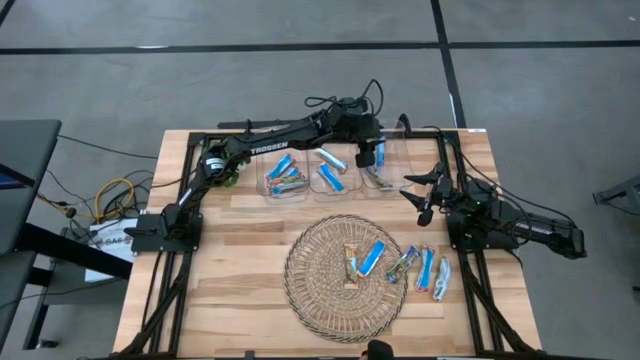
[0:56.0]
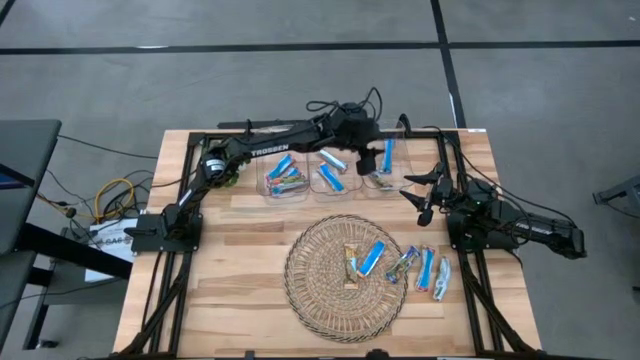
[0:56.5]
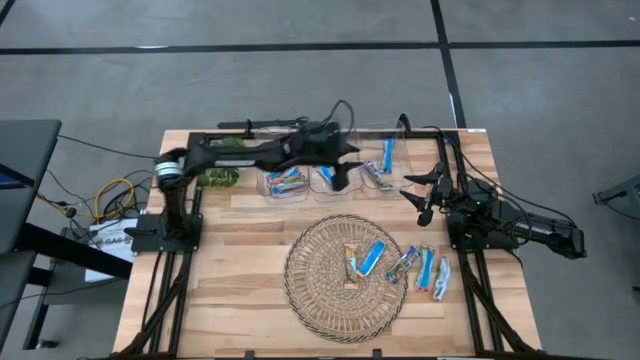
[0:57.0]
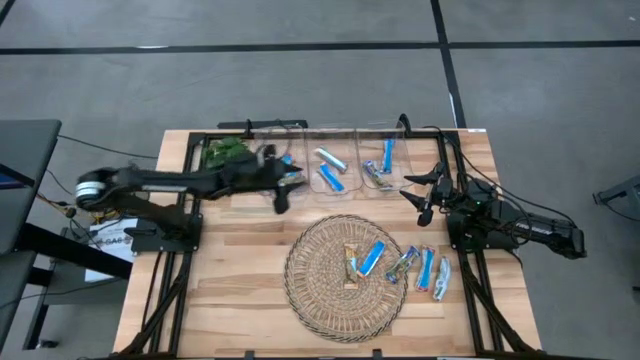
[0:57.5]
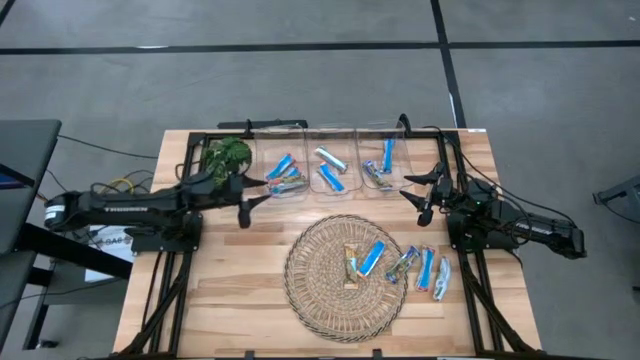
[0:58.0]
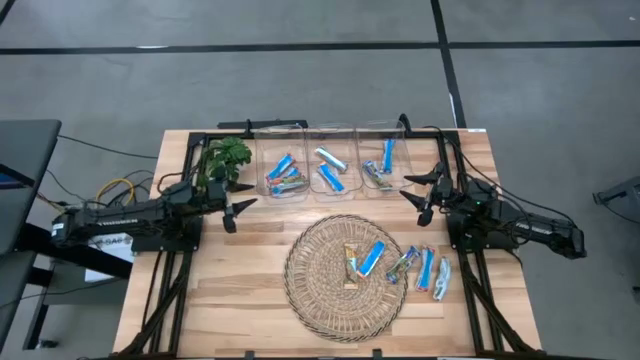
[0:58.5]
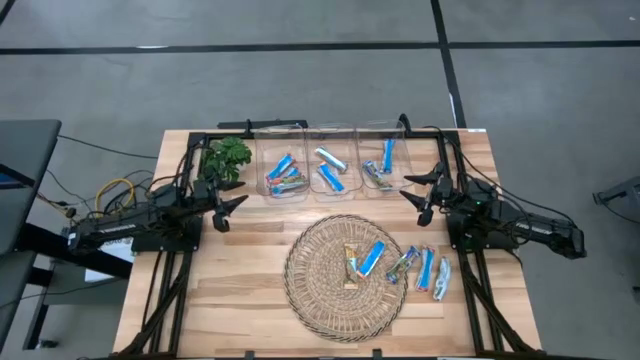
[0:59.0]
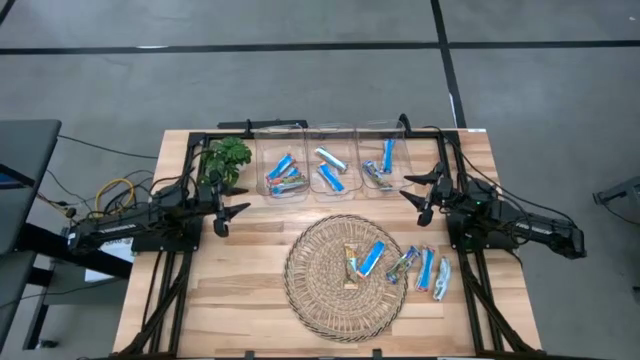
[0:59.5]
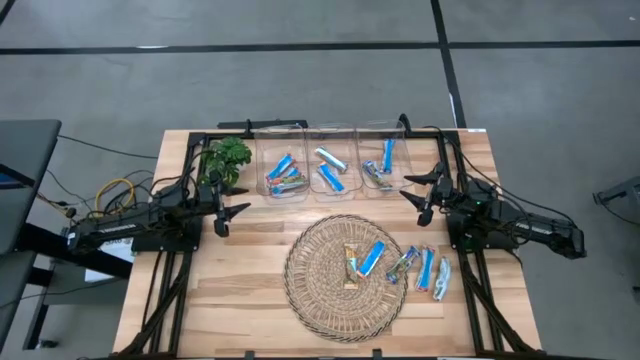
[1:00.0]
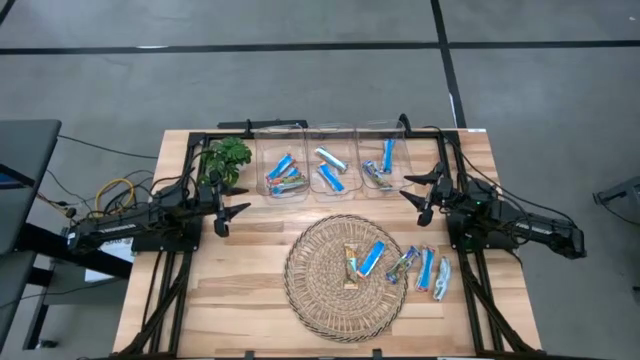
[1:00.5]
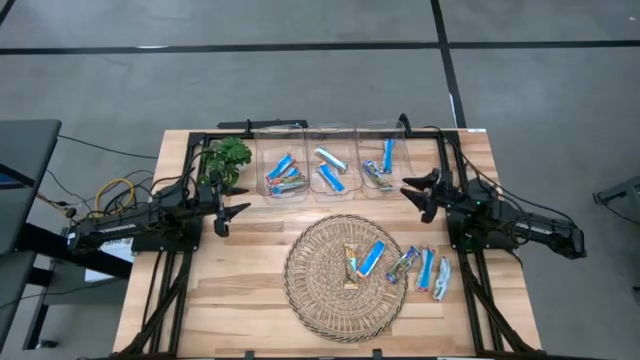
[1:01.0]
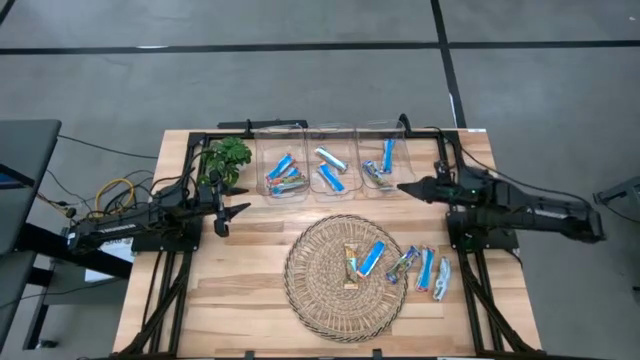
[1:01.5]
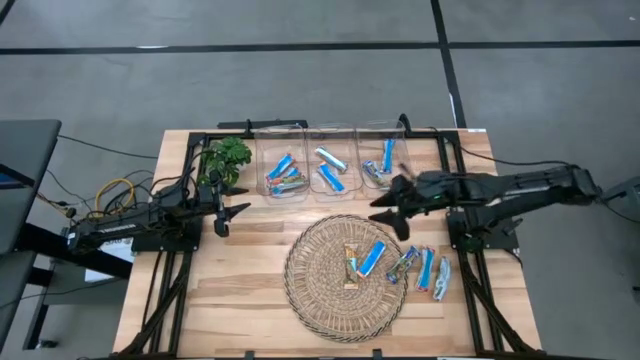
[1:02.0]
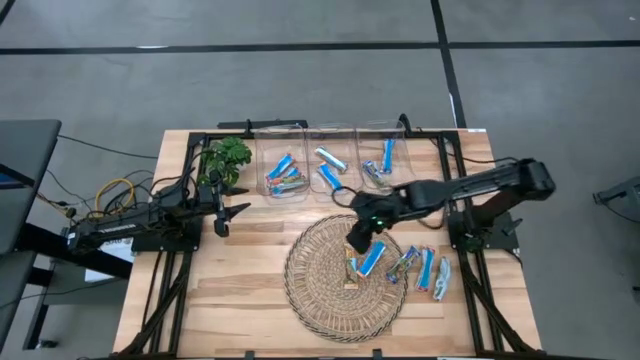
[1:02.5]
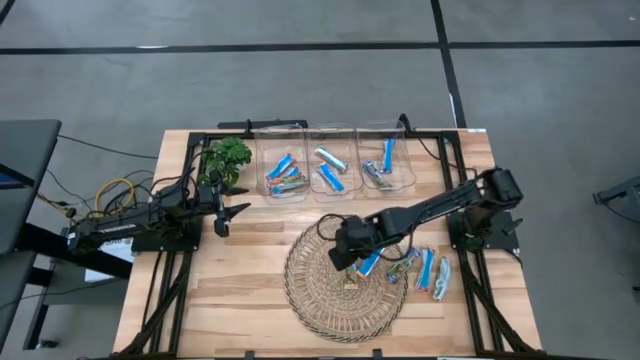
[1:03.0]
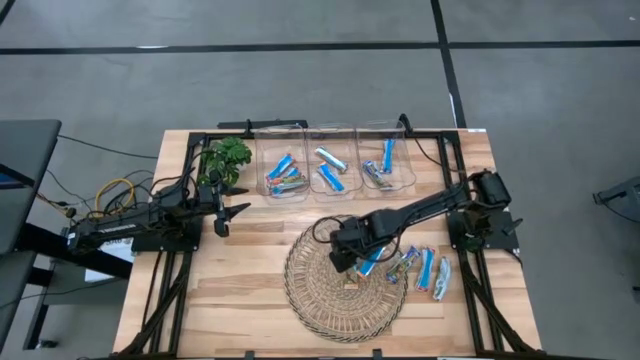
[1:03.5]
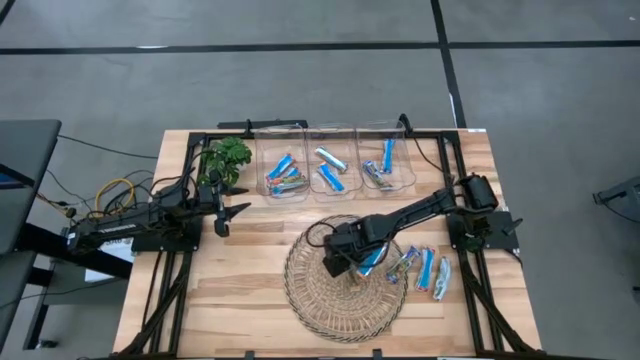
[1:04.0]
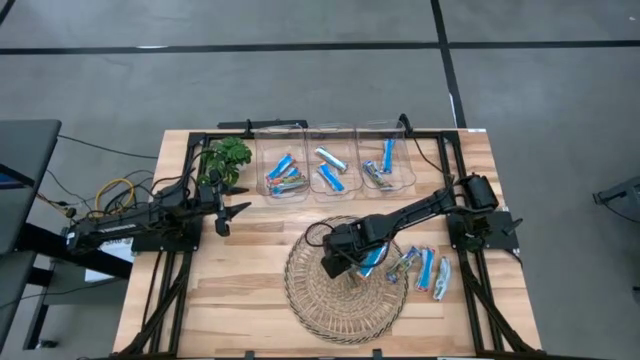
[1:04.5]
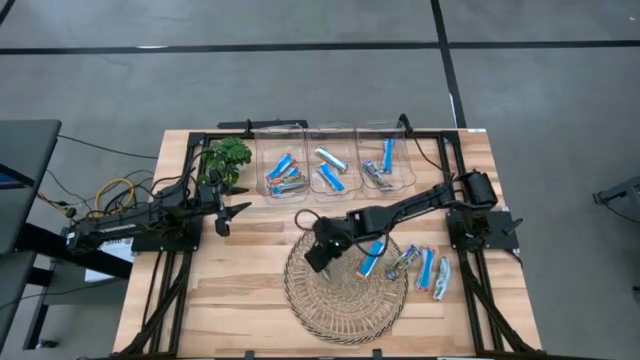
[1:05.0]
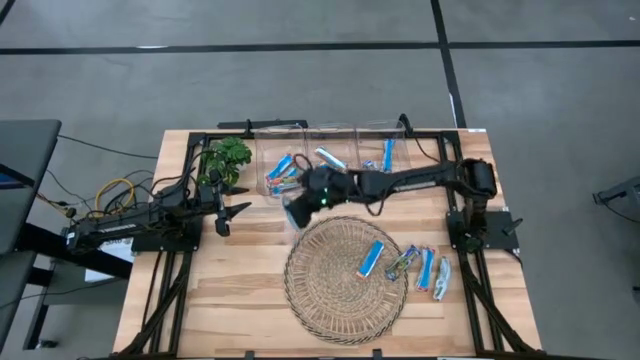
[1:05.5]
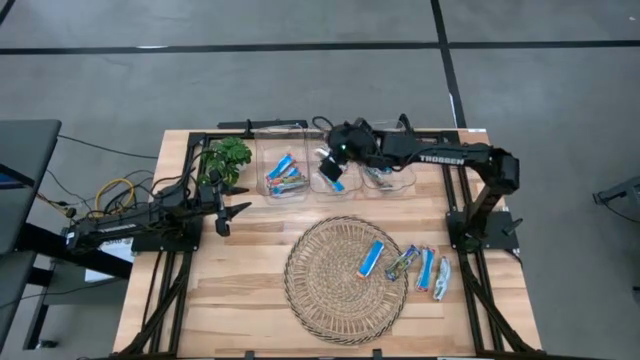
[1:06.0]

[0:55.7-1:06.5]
Task: Pick and place Granola Bars by type
Put the yellow granola bar into the middle transparent bin

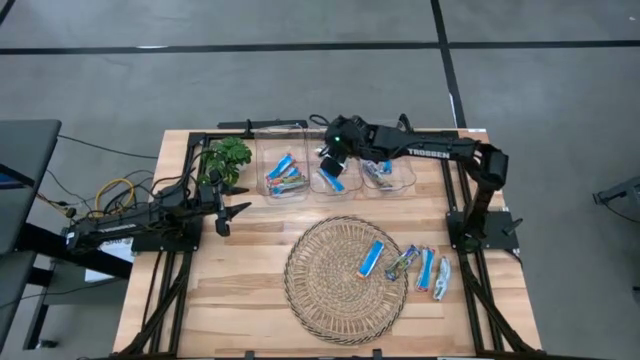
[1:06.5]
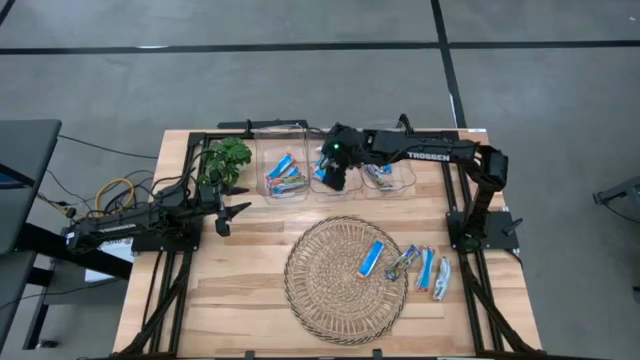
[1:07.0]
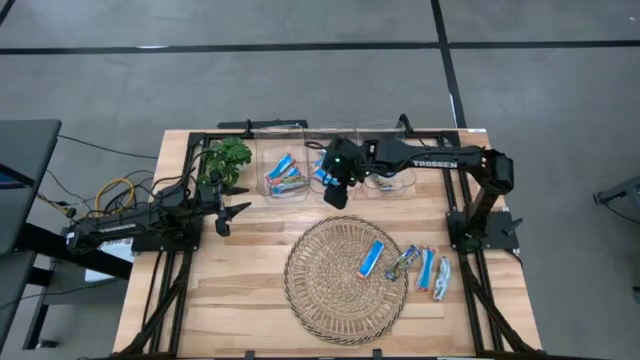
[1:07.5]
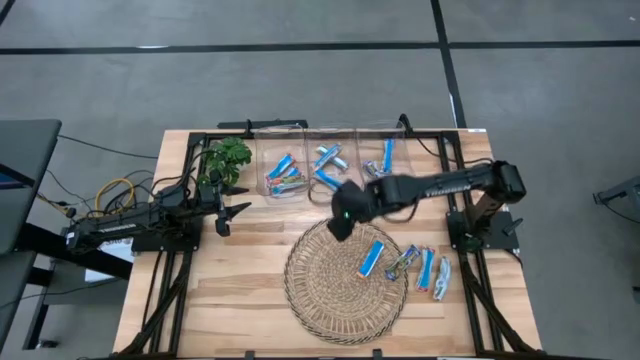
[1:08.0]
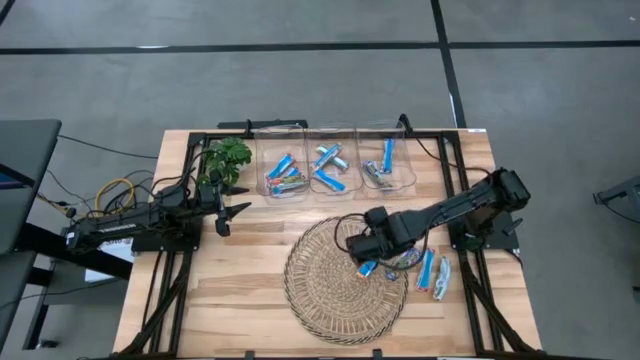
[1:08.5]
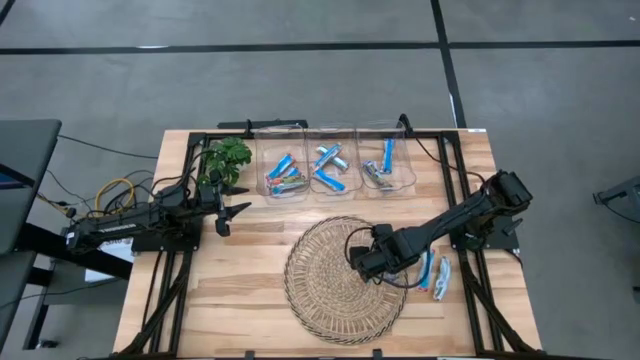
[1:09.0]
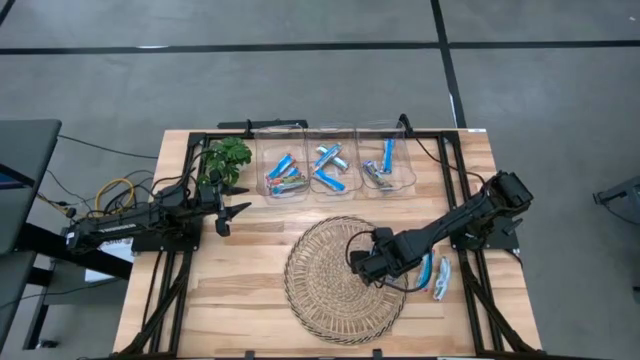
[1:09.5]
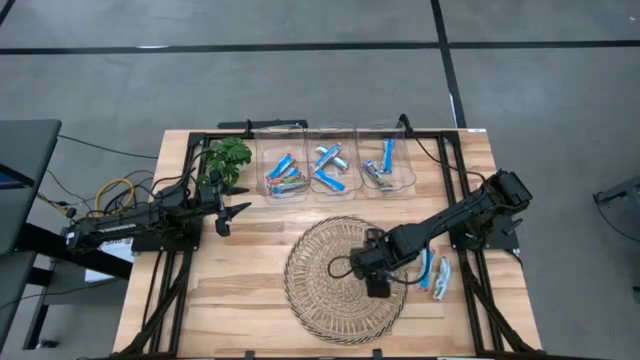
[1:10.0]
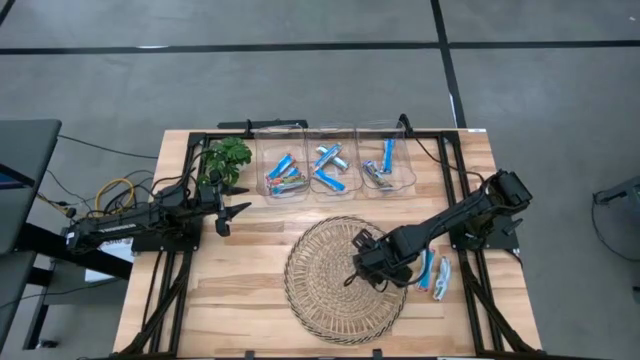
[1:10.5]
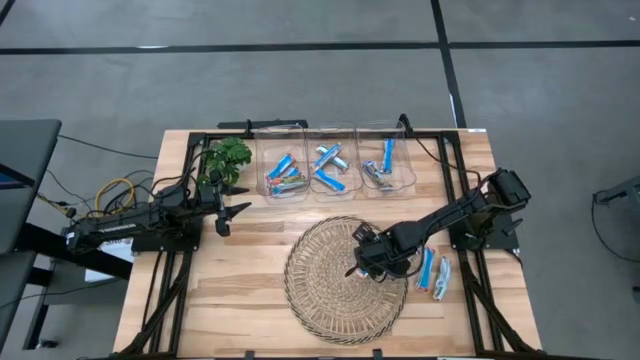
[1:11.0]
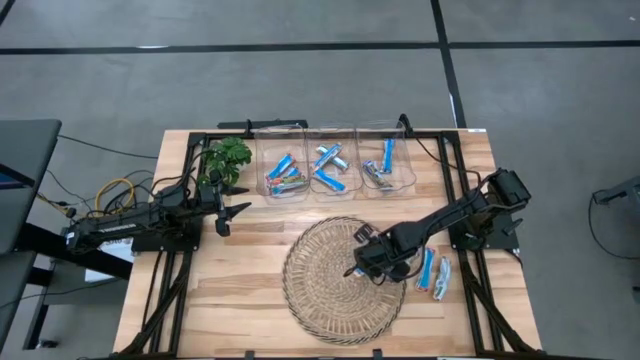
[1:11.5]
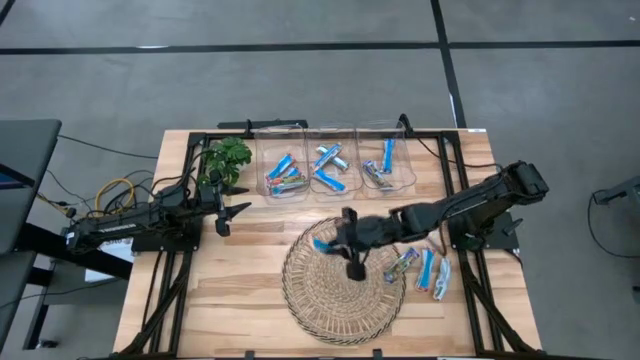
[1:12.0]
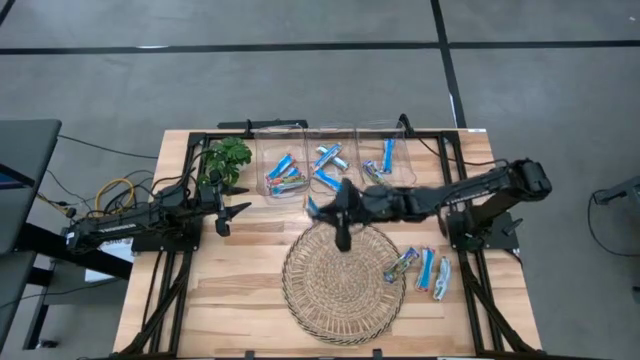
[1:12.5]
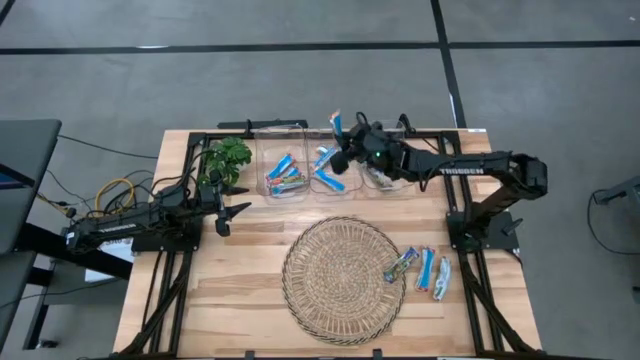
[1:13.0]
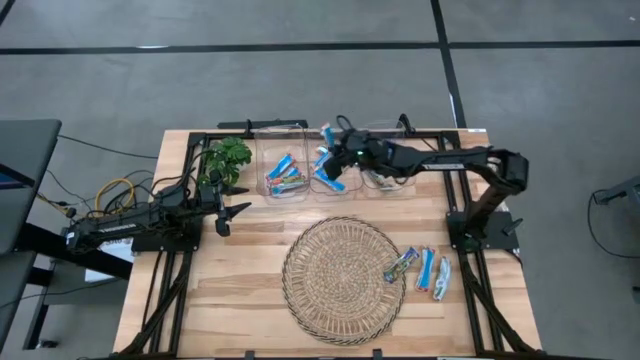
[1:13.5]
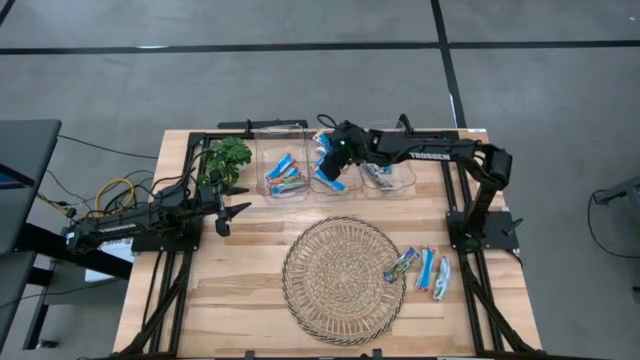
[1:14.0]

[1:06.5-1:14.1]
Put the yellow granola bar into the middle transparent bin

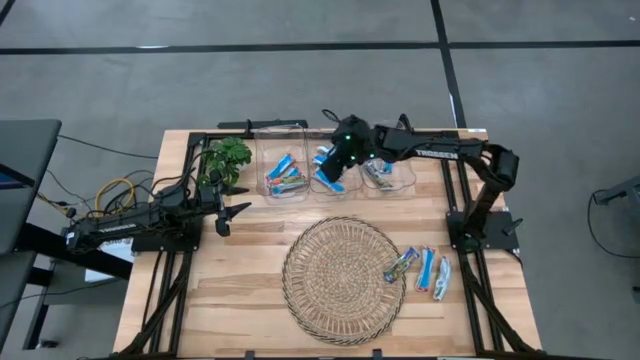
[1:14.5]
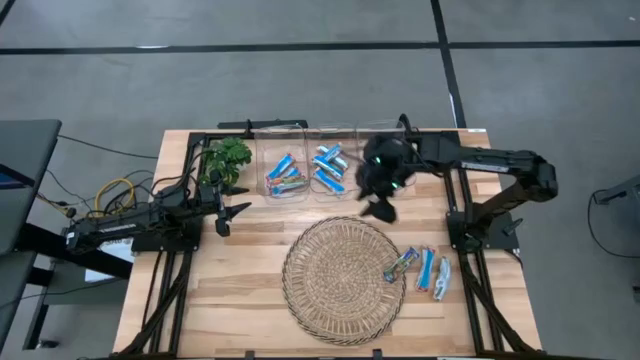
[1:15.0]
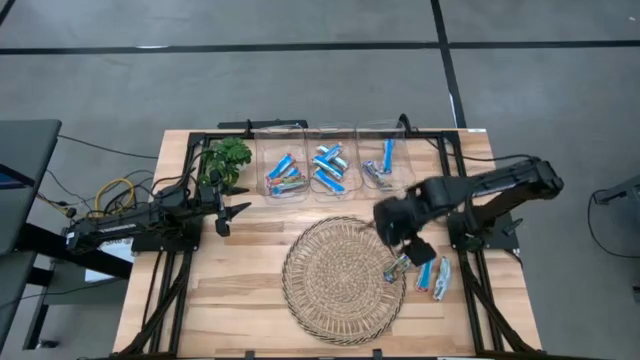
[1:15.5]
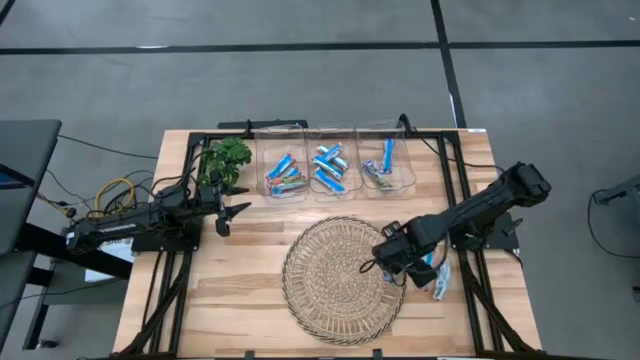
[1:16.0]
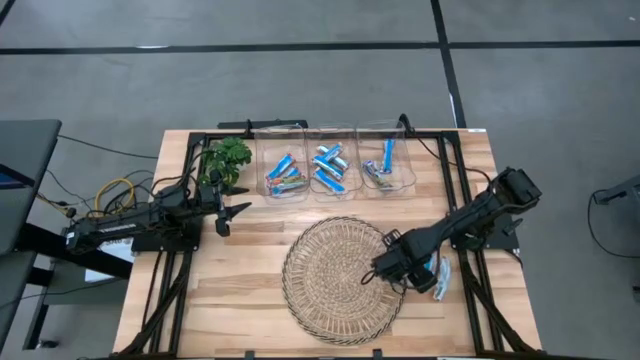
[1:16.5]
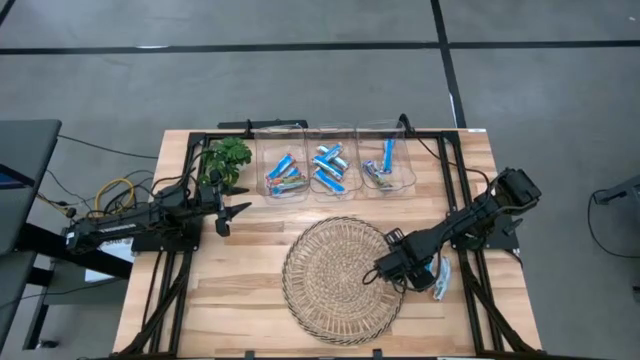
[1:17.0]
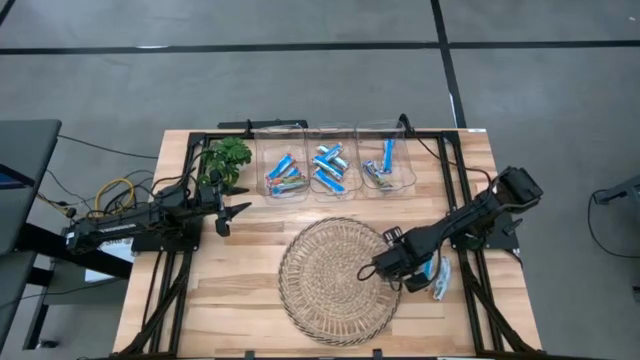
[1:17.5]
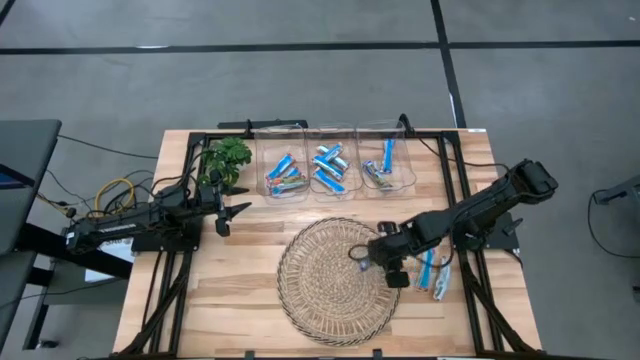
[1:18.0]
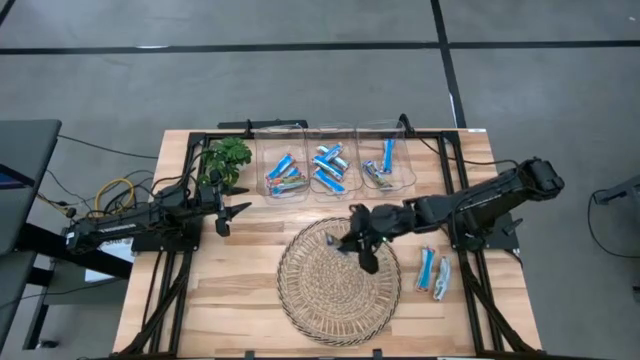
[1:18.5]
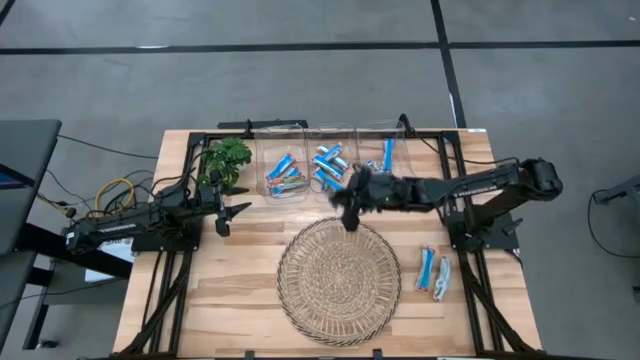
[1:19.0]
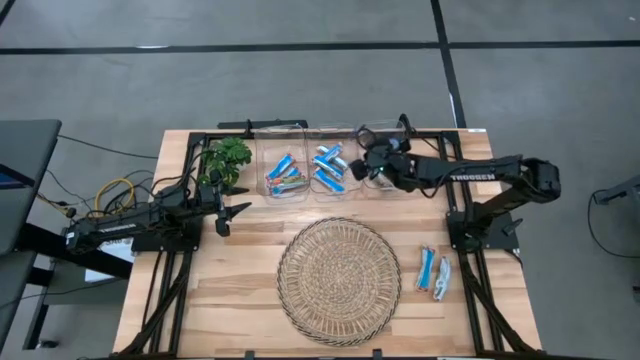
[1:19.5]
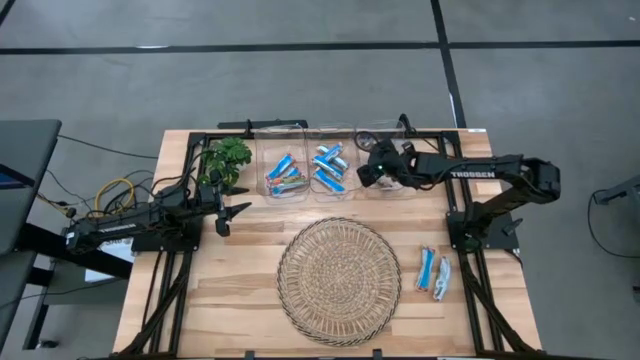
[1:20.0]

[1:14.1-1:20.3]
Put the blue granola bar into the right transparent bin
